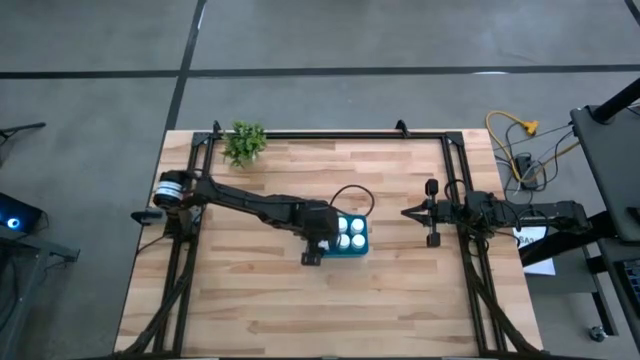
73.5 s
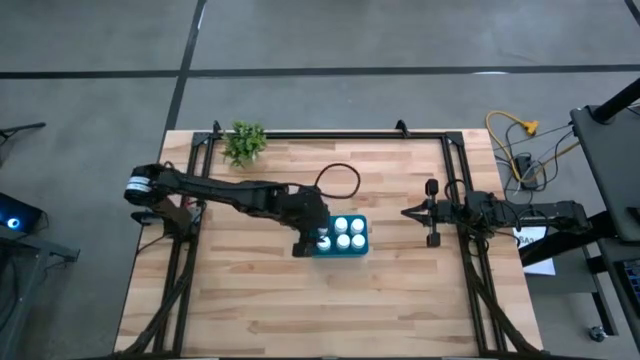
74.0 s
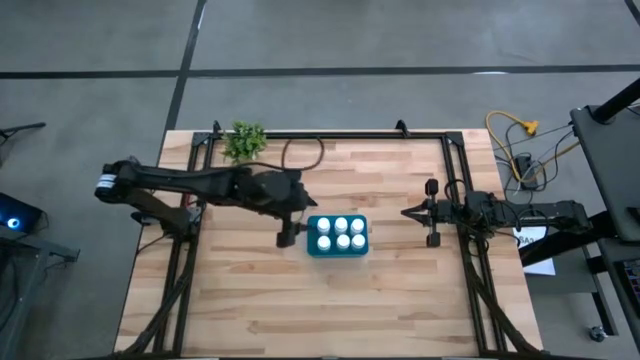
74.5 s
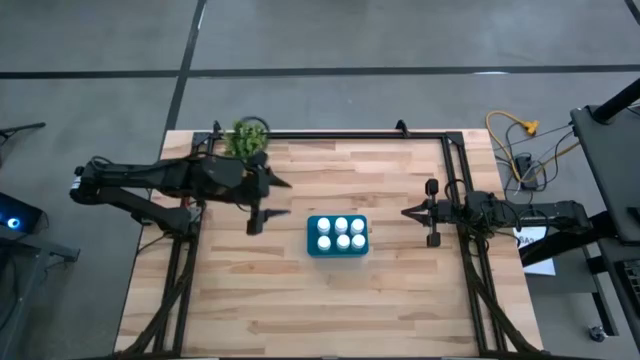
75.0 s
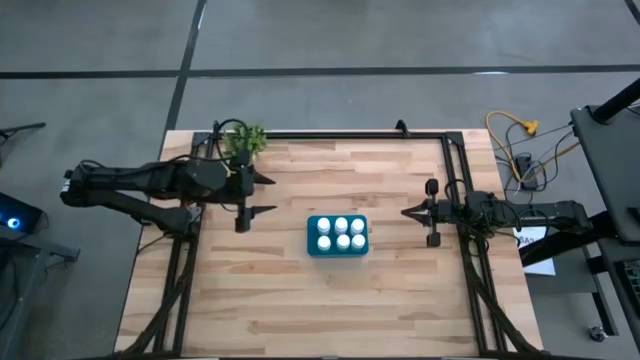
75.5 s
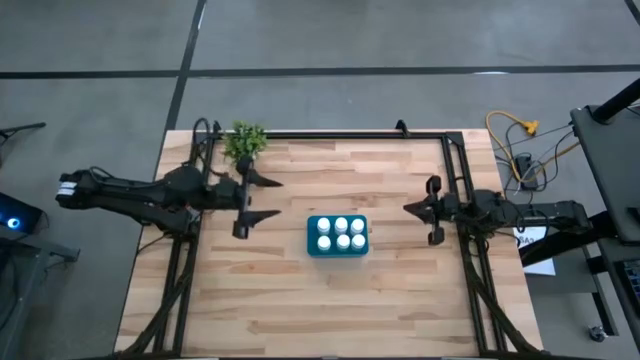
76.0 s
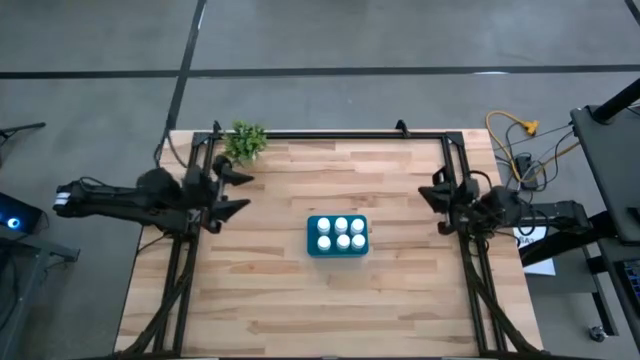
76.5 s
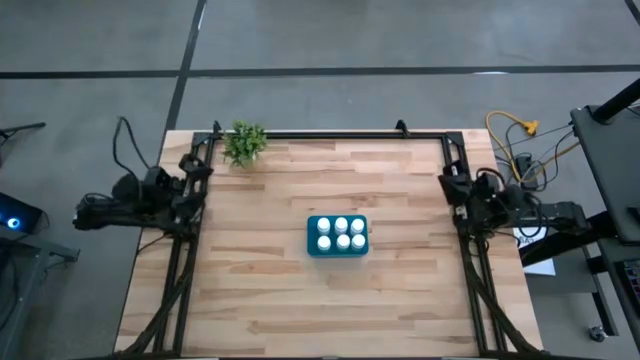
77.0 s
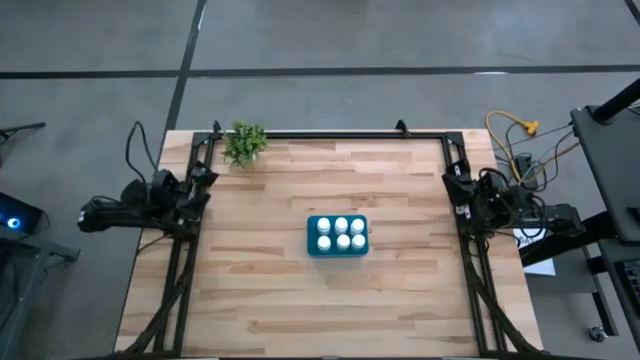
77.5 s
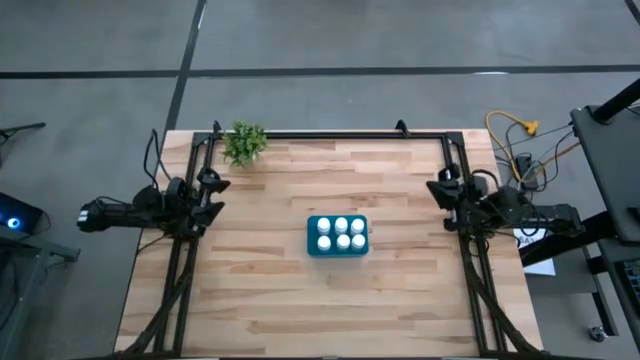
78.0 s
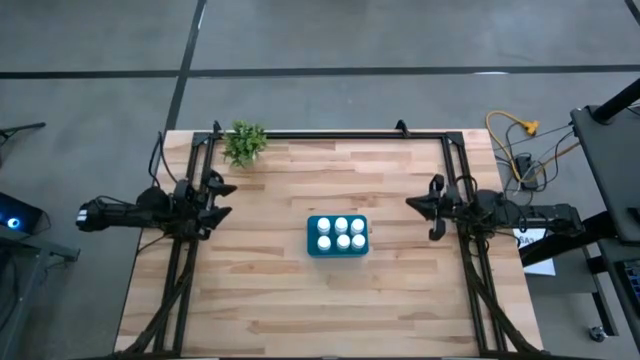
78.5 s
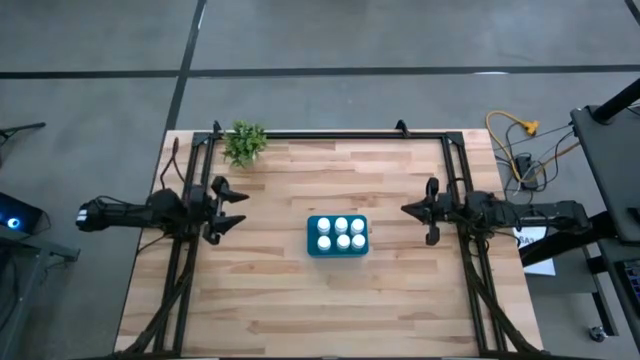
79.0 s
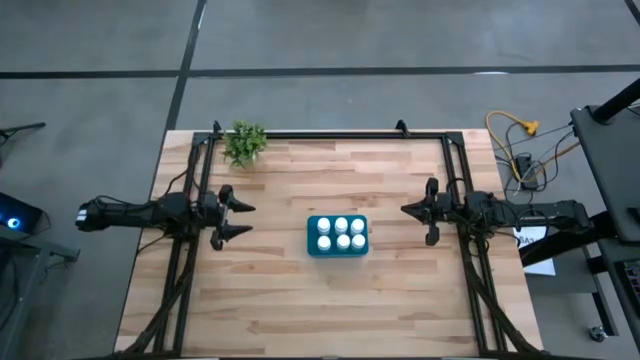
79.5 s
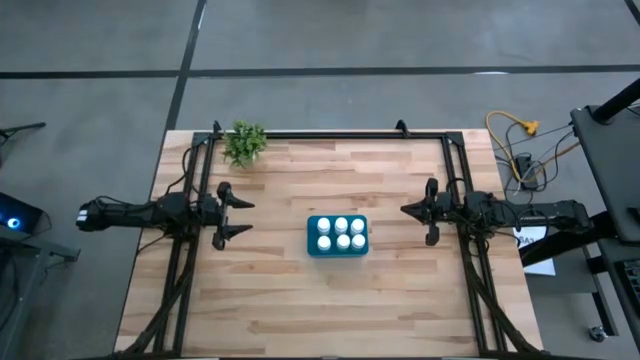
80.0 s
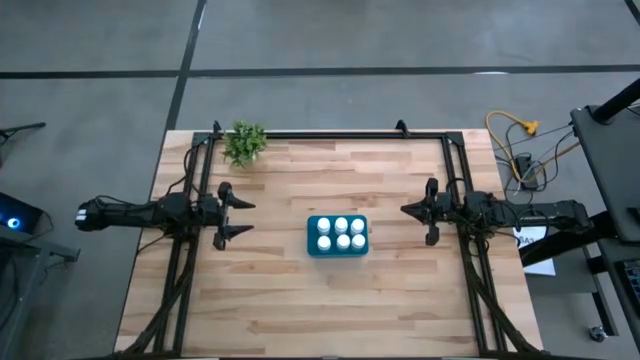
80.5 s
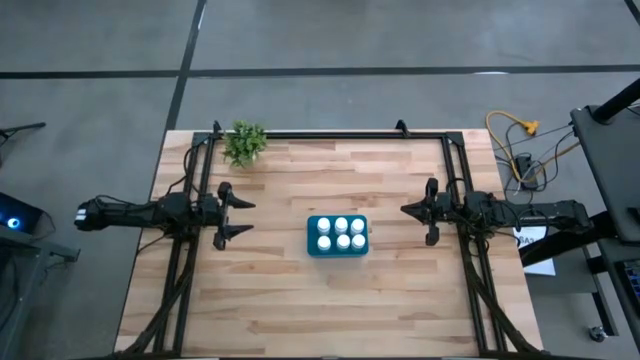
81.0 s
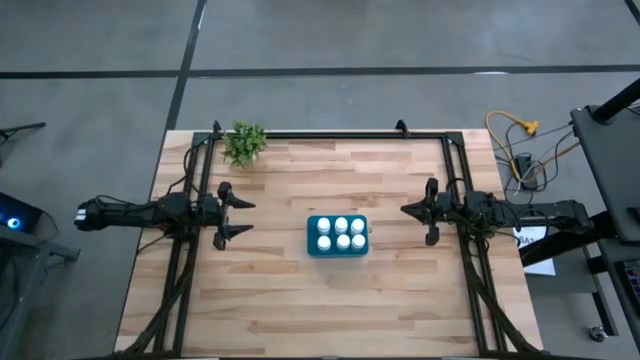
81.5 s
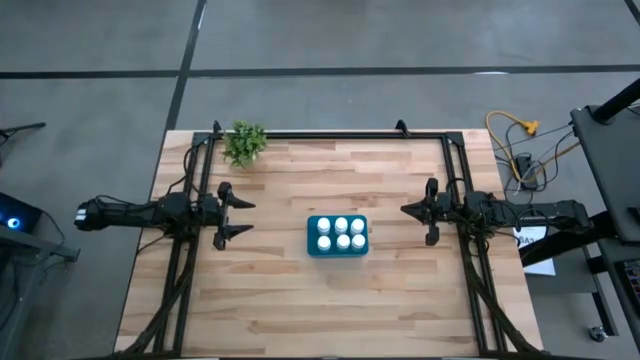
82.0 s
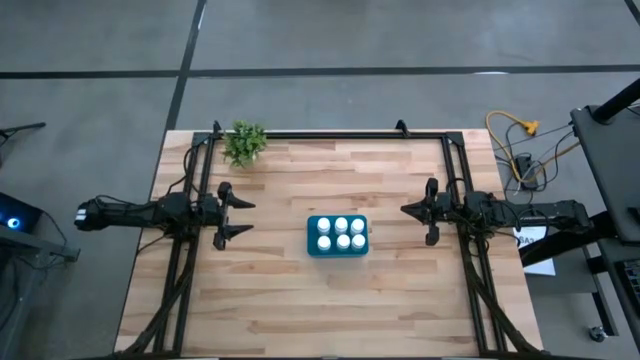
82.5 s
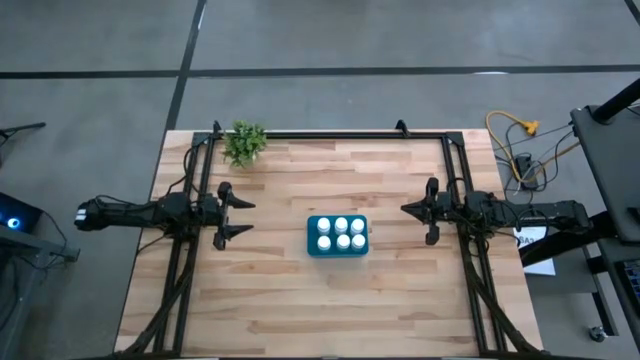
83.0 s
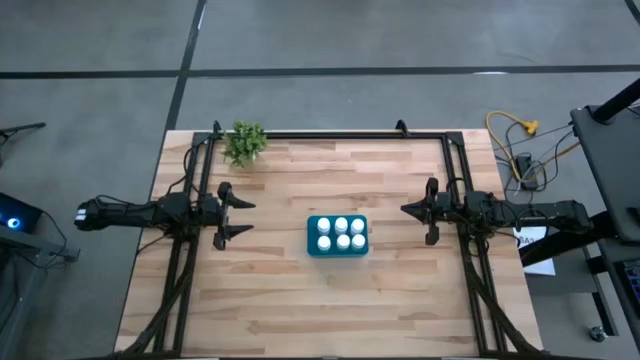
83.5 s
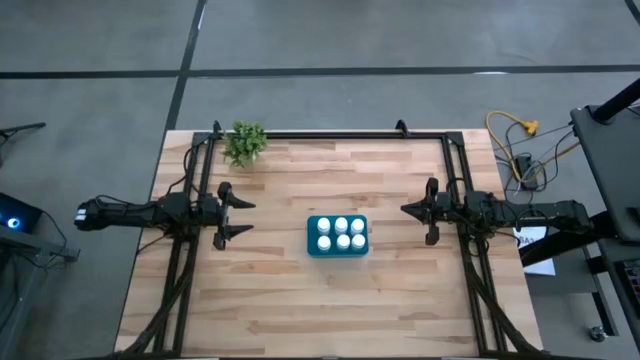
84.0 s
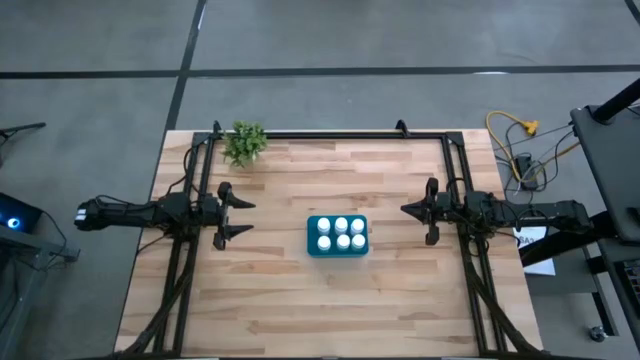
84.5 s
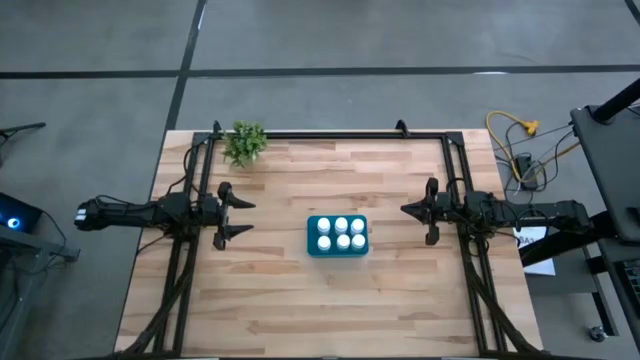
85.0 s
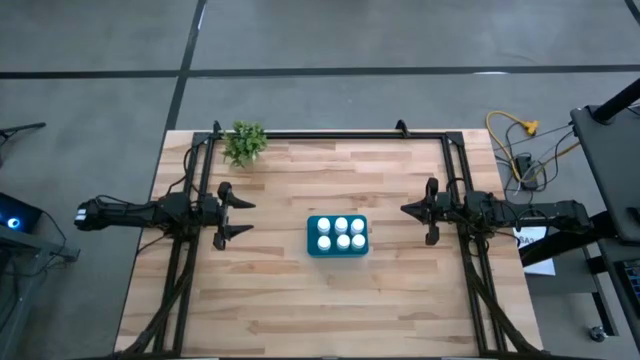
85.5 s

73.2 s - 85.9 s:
Task: Pick and place pill bottles into a basket
Return to Home Position

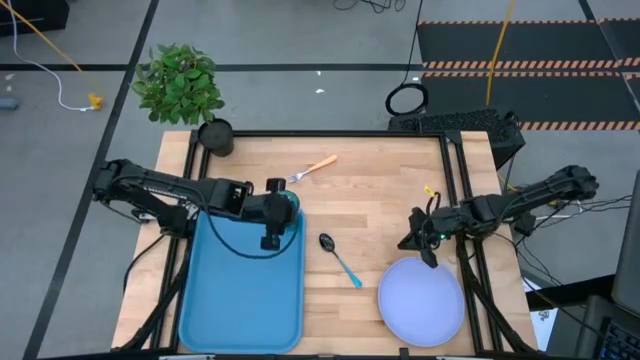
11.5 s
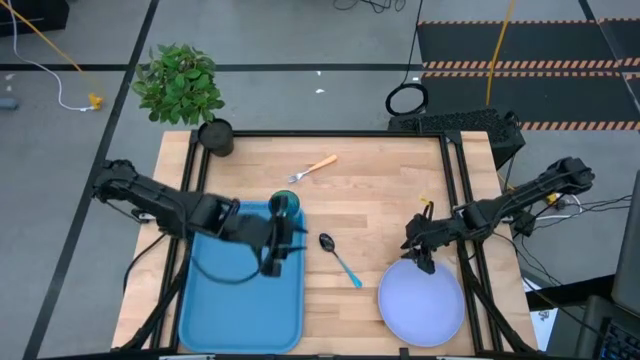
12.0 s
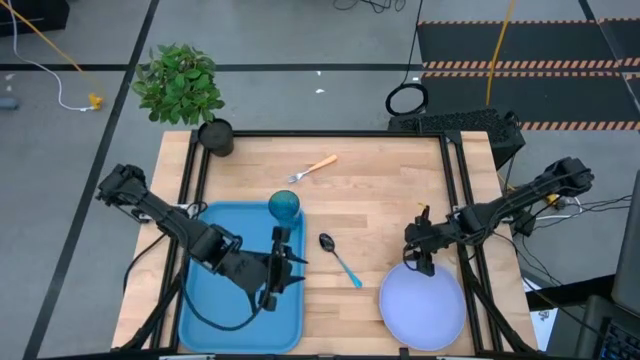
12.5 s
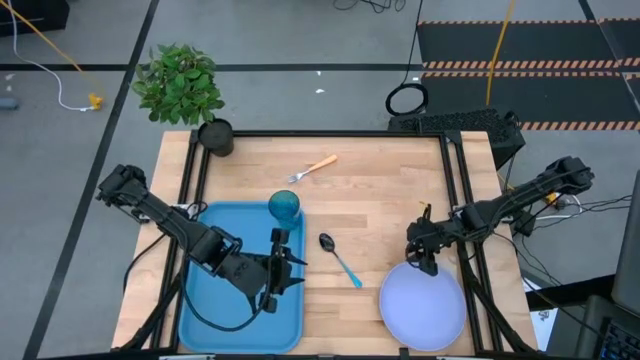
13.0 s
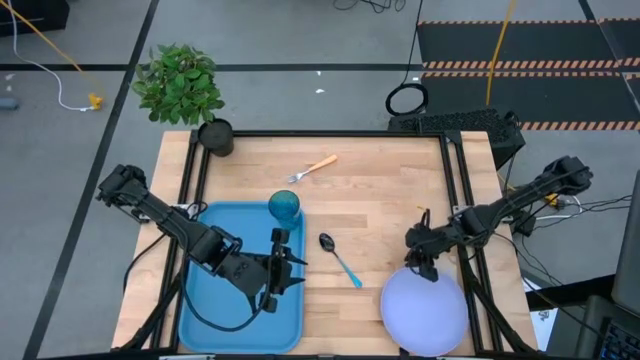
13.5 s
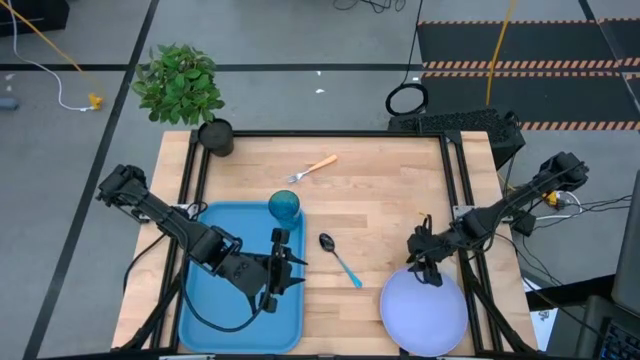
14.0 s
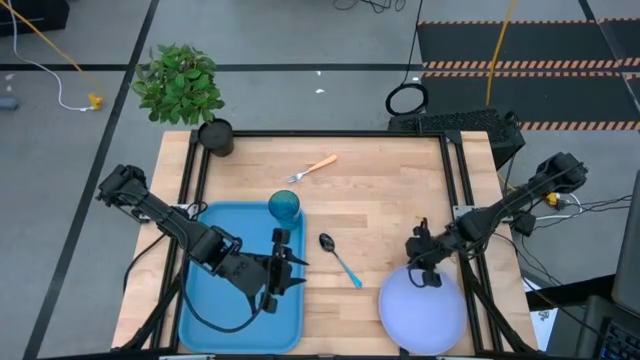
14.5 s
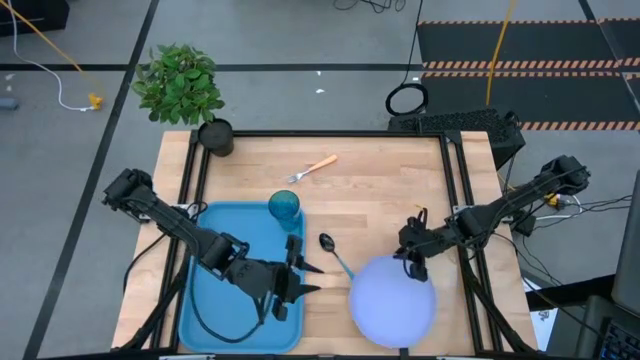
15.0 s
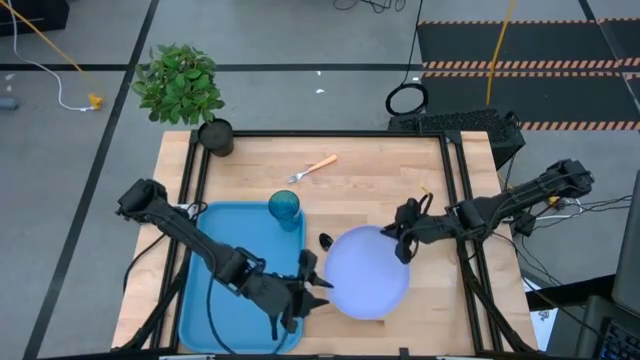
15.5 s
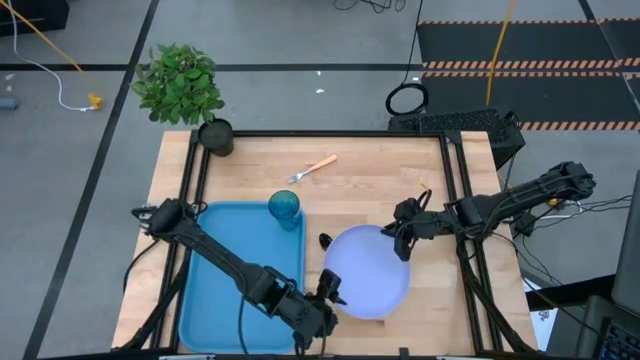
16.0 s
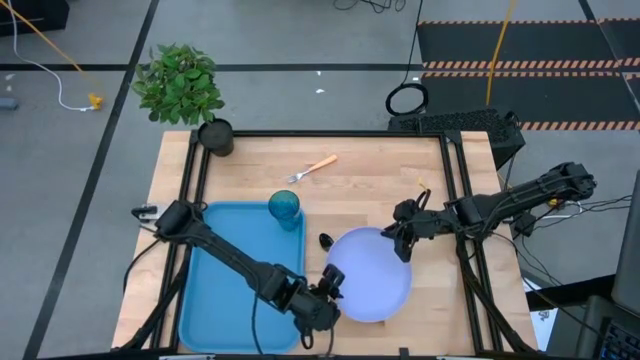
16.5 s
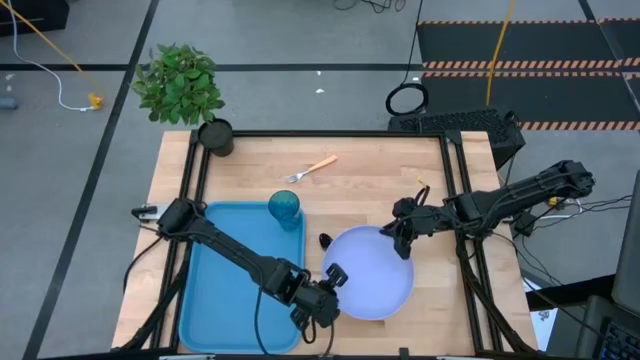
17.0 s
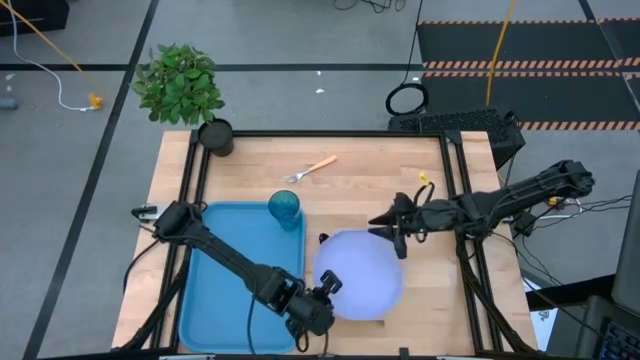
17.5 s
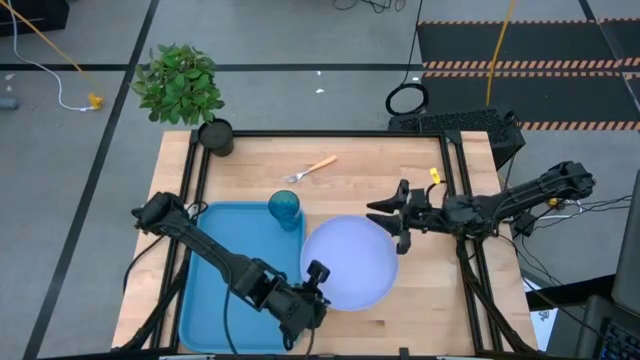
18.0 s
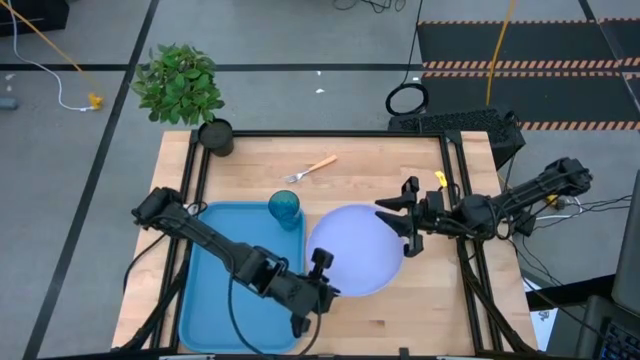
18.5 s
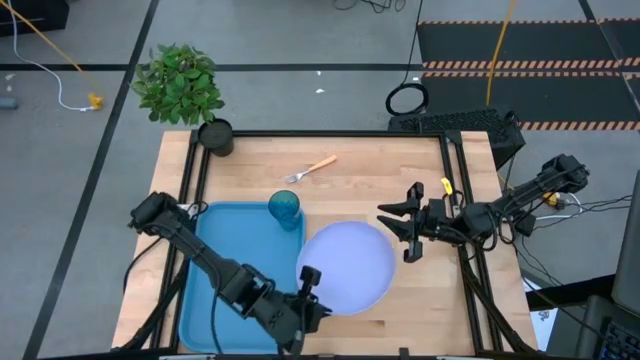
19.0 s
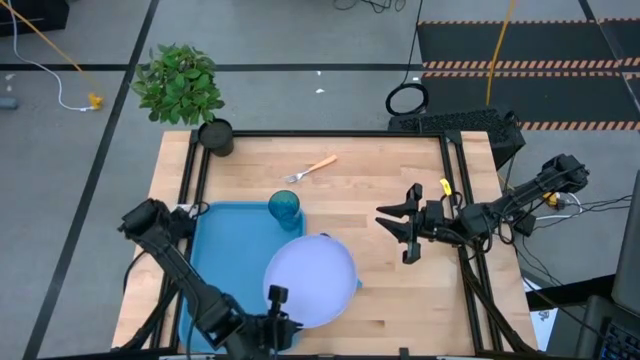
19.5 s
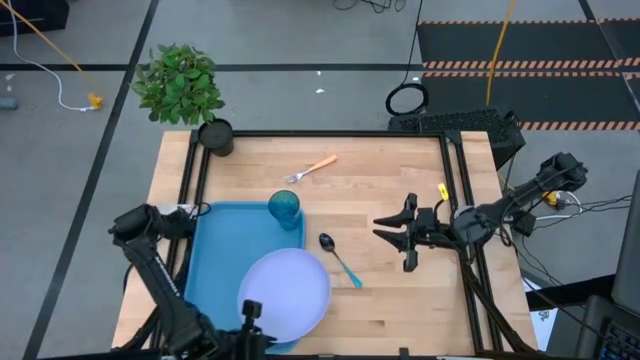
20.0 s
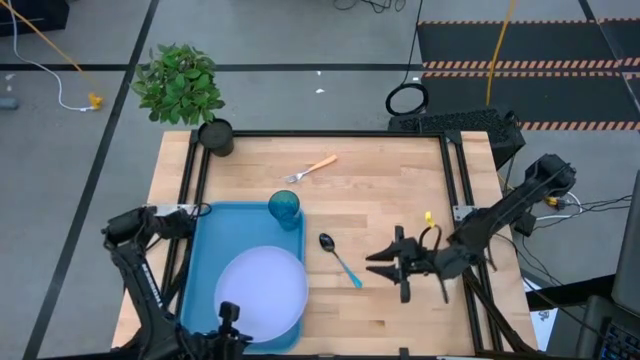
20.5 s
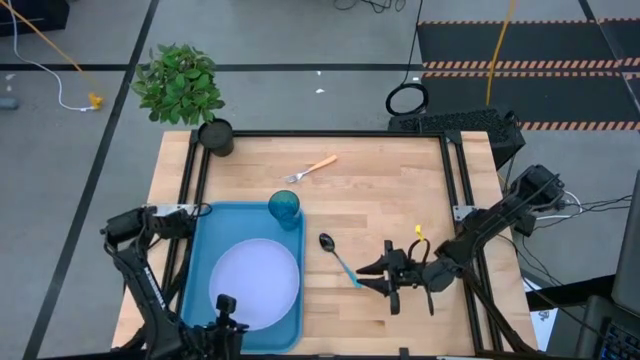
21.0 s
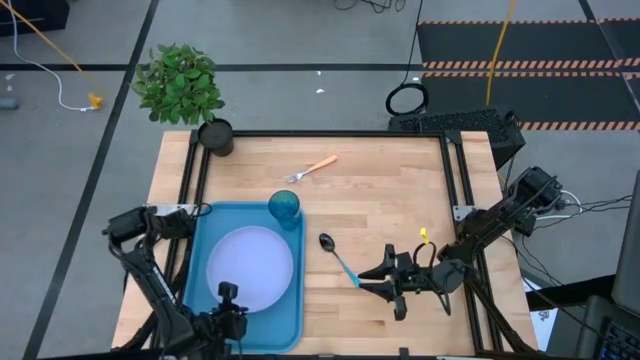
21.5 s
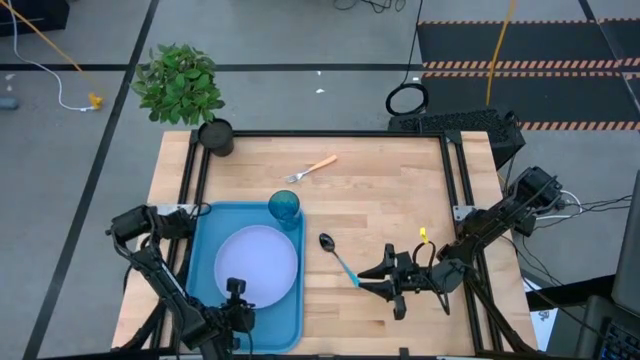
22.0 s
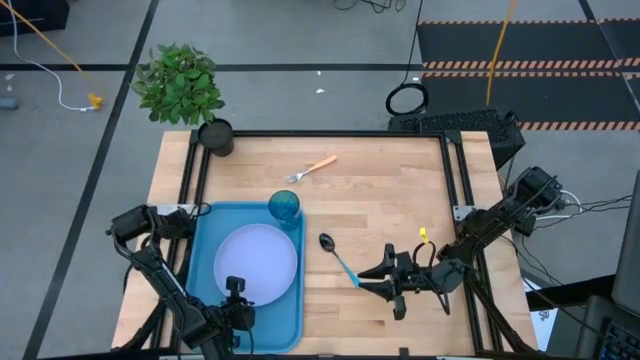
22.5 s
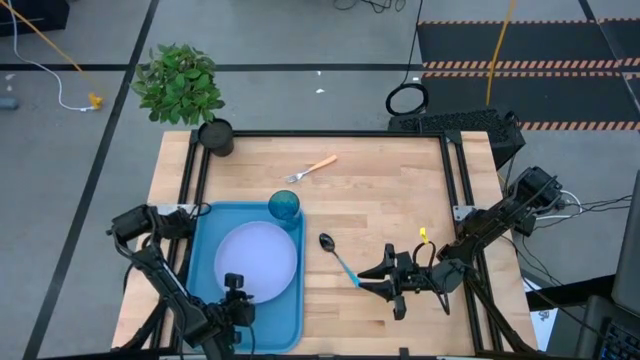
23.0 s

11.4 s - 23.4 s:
Task: Pick and place plate/cup/fork/spoon on tray
Put the purple to the bottom right of the blue cup on the blue tray
